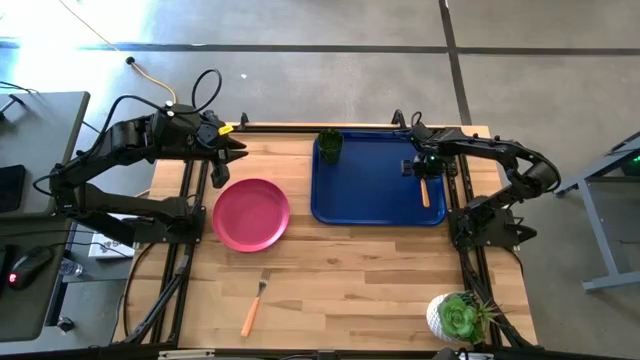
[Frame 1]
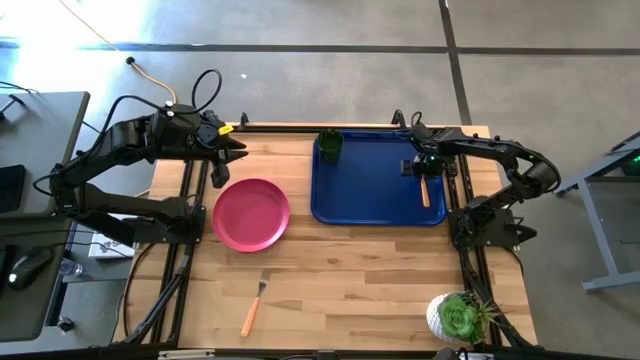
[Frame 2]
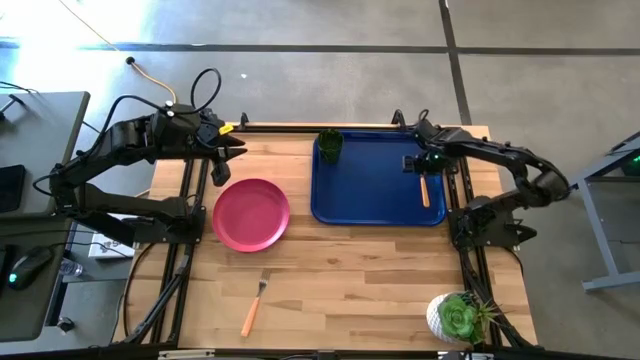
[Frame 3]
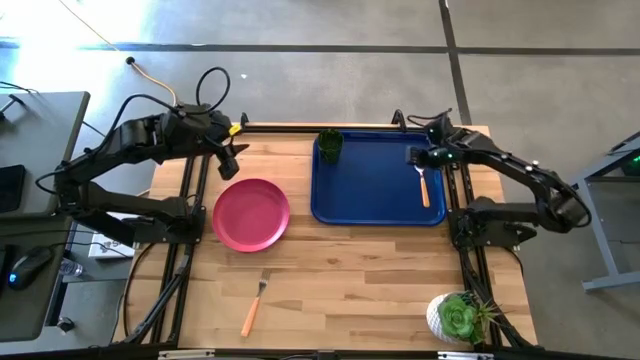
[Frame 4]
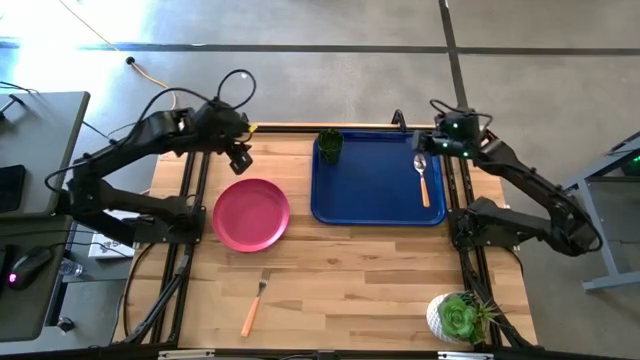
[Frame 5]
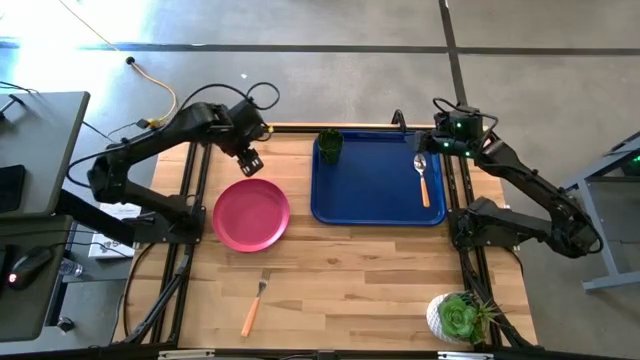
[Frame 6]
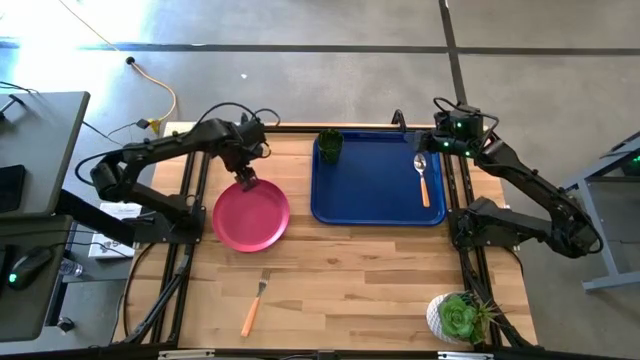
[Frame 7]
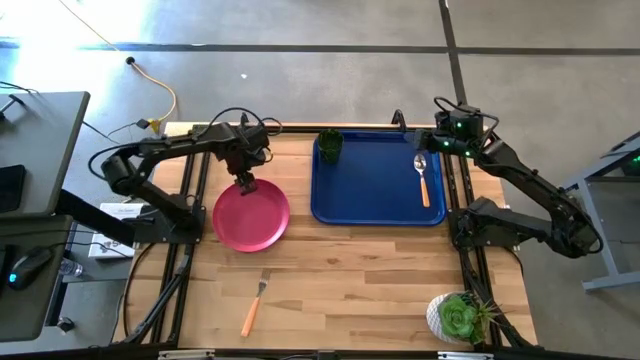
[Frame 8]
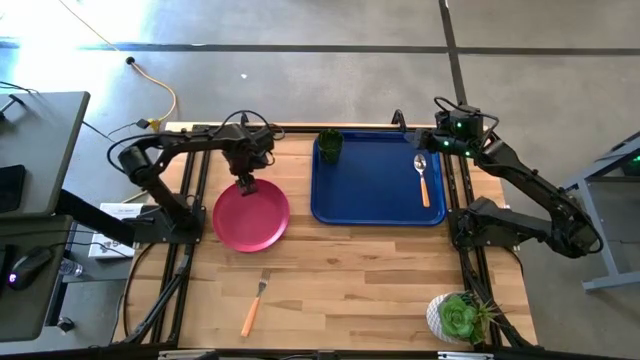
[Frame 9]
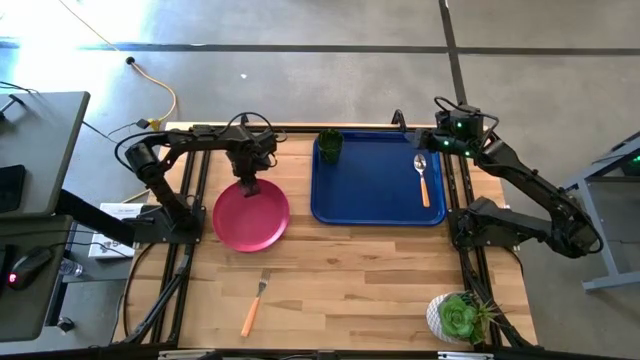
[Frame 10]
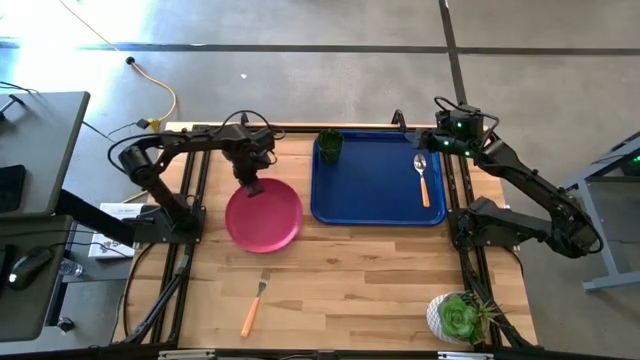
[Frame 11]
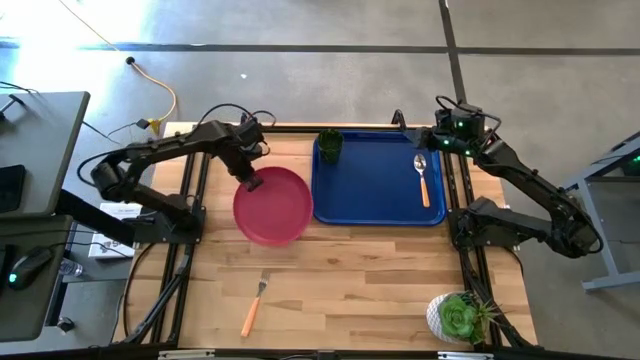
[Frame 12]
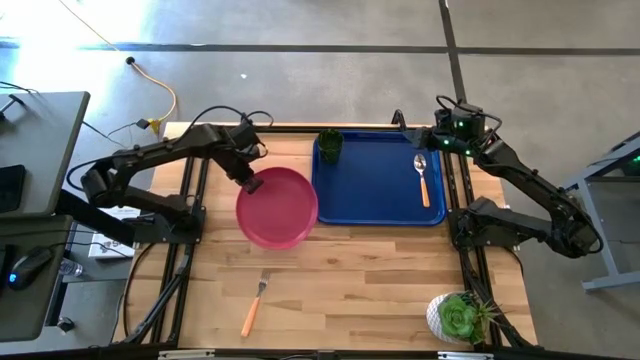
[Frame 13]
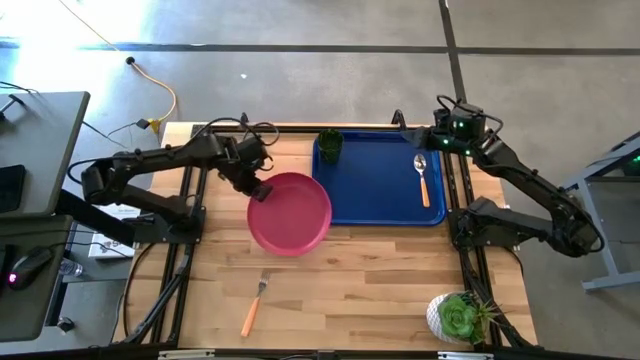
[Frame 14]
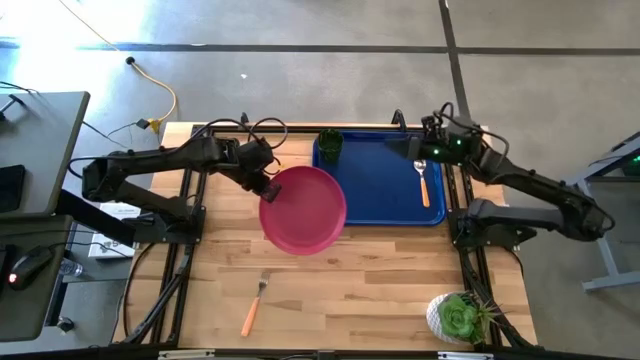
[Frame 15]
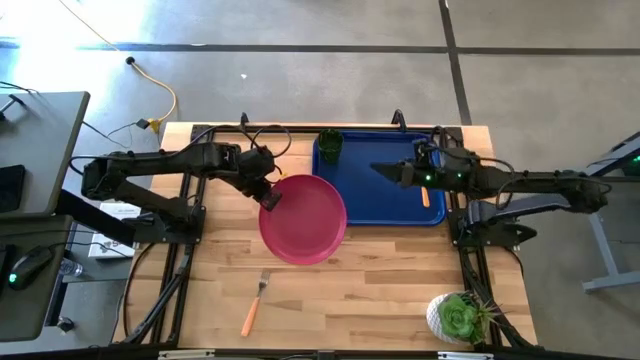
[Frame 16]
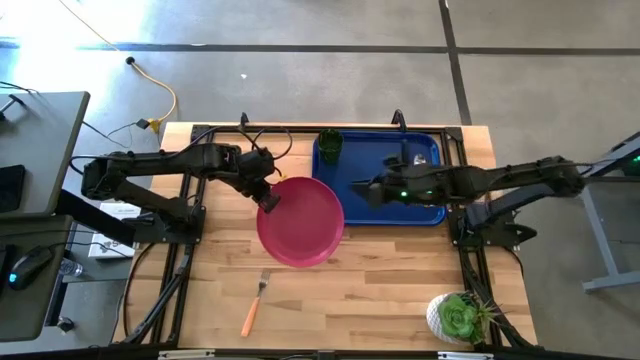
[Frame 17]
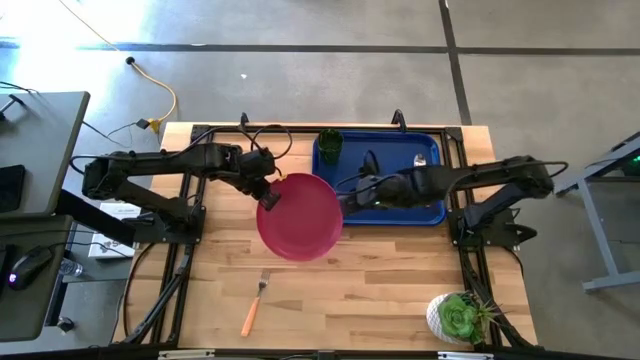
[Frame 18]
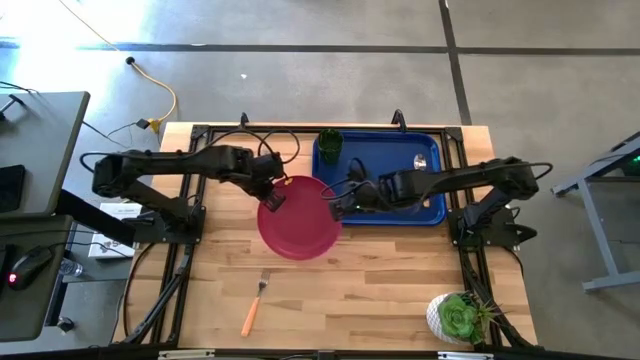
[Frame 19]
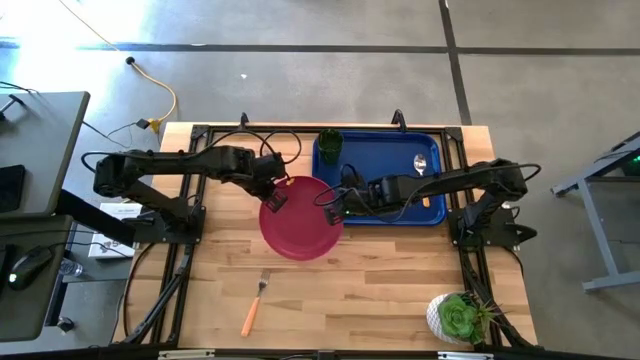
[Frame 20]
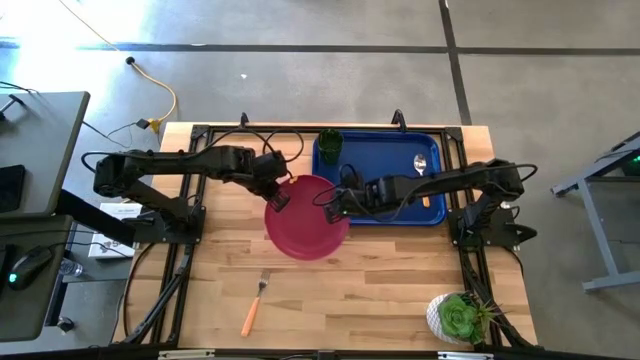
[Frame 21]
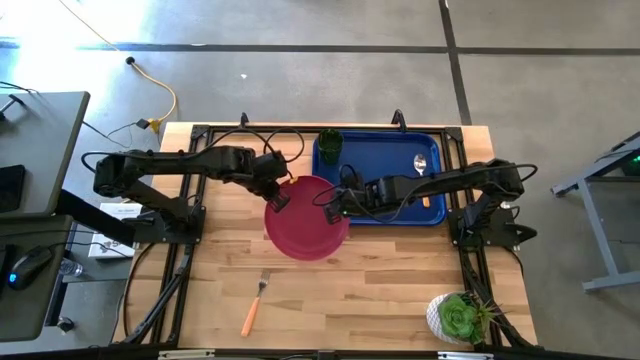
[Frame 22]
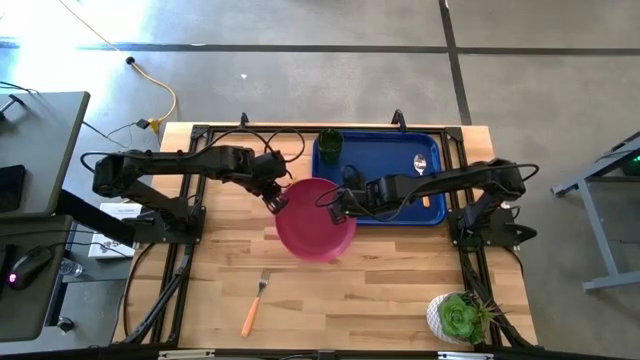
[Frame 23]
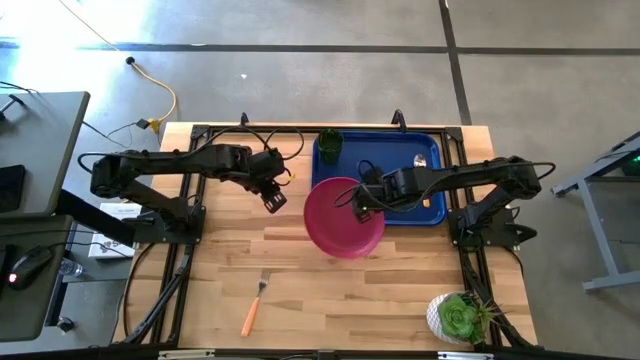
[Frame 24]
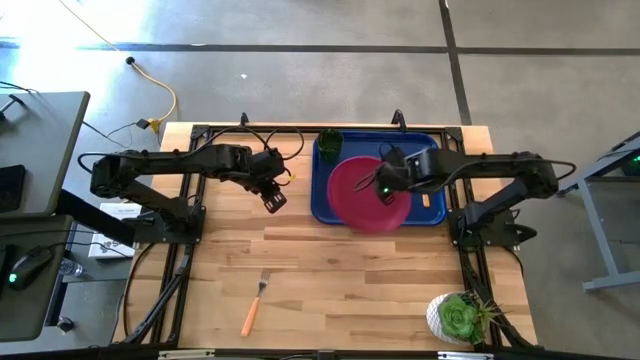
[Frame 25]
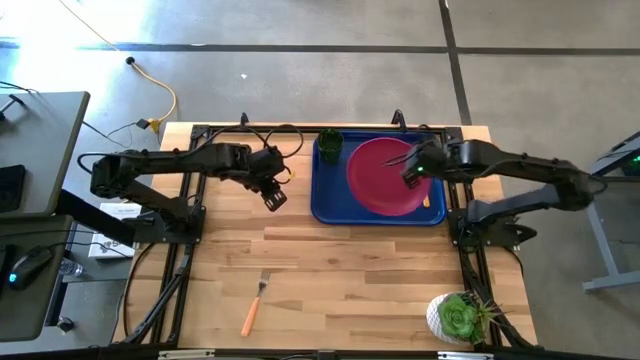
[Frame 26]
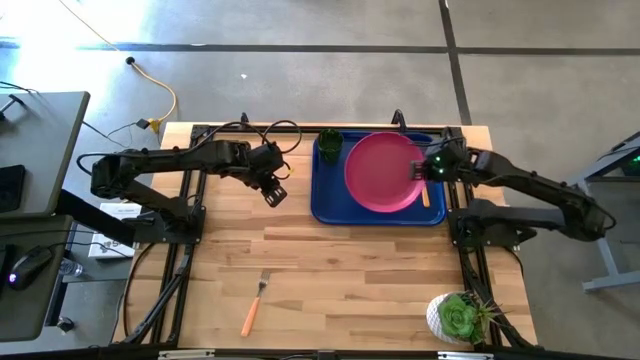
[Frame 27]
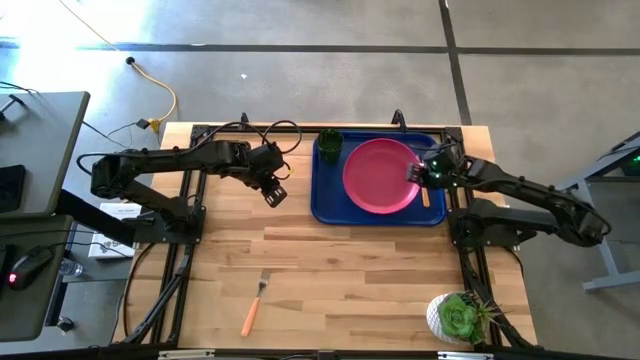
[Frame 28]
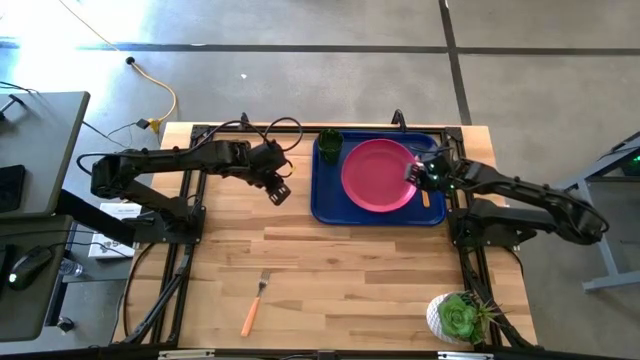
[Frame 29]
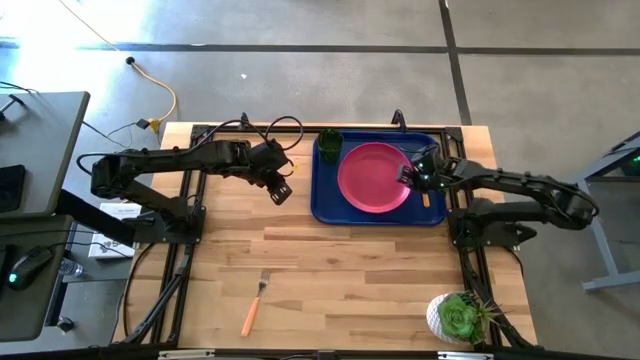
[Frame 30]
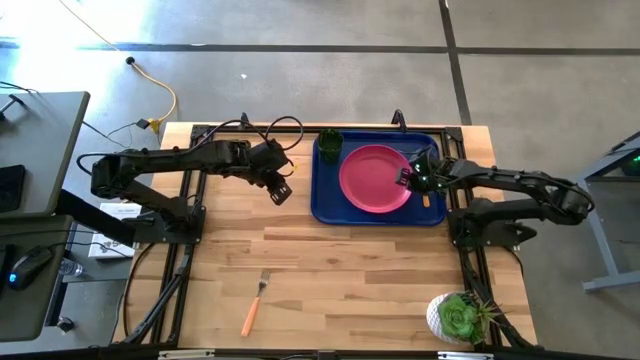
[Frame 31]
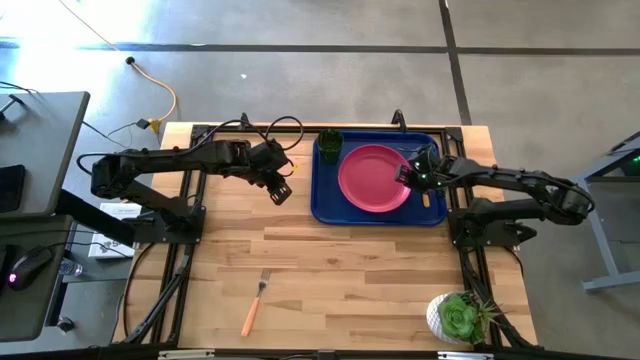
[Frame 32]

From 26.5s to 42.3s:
Task: Pick and place plate/cup/fork/spoon on tray
Put the pink plate on the blue tray

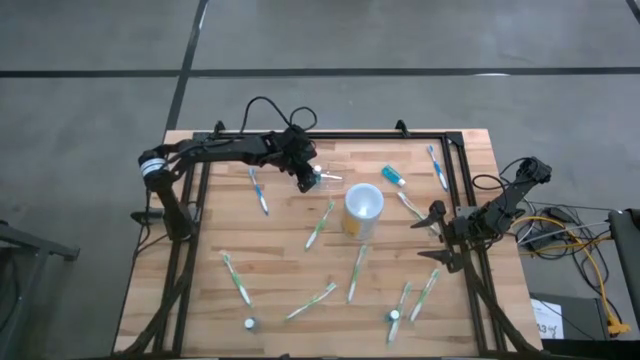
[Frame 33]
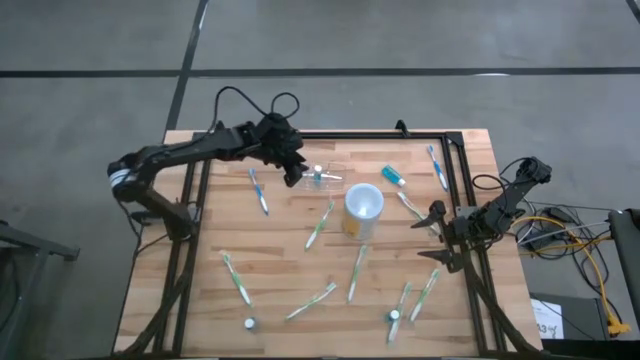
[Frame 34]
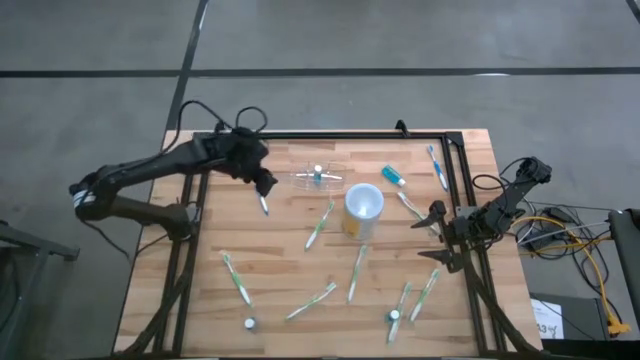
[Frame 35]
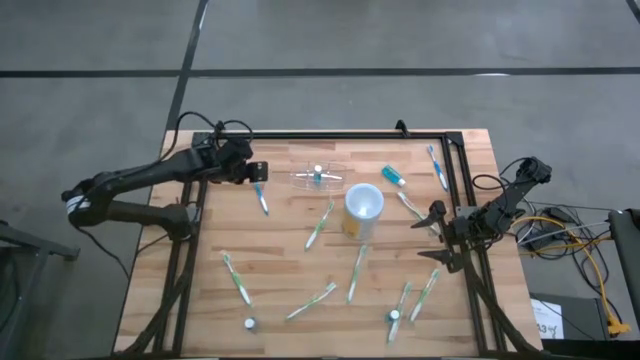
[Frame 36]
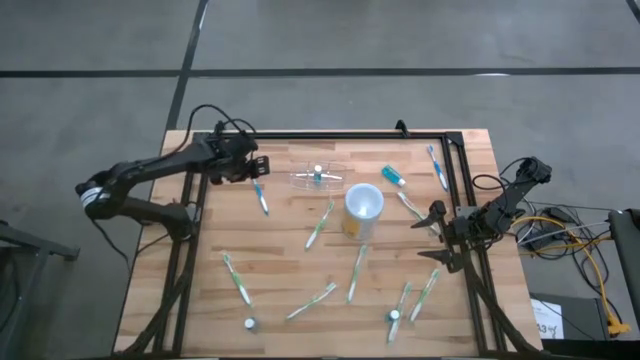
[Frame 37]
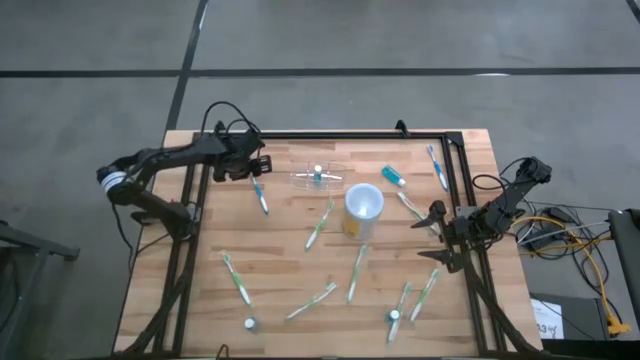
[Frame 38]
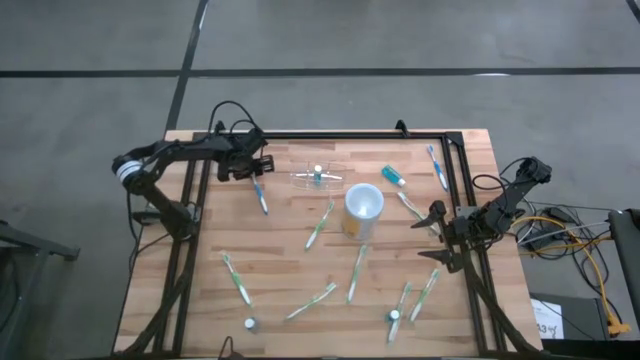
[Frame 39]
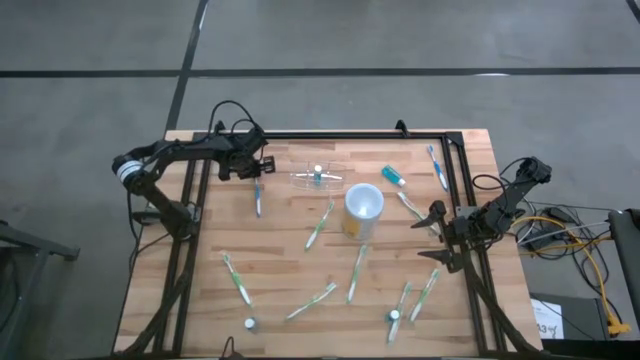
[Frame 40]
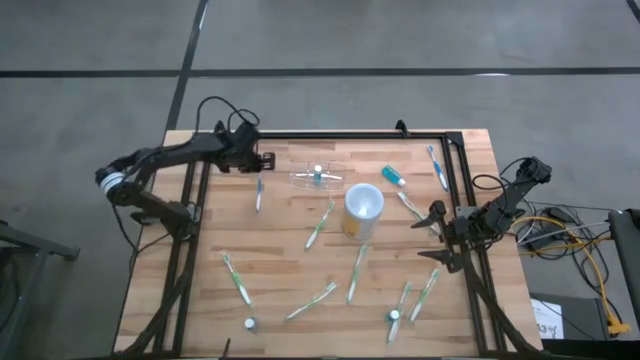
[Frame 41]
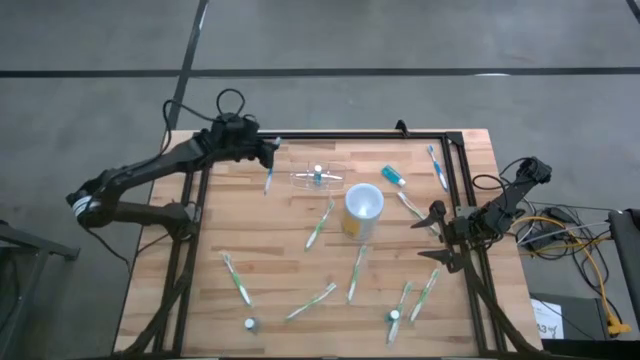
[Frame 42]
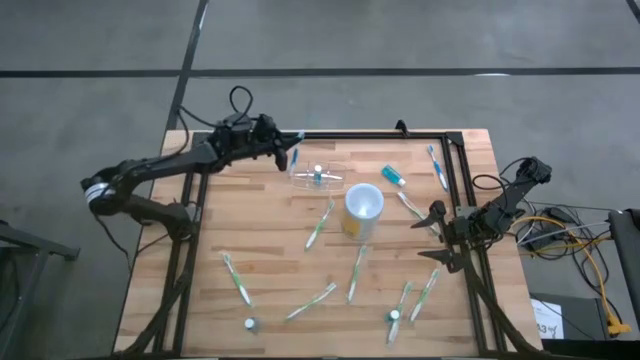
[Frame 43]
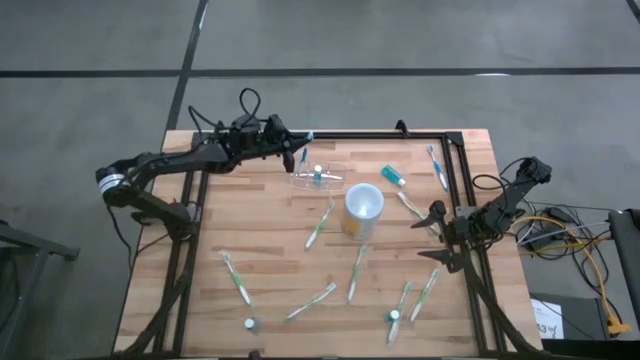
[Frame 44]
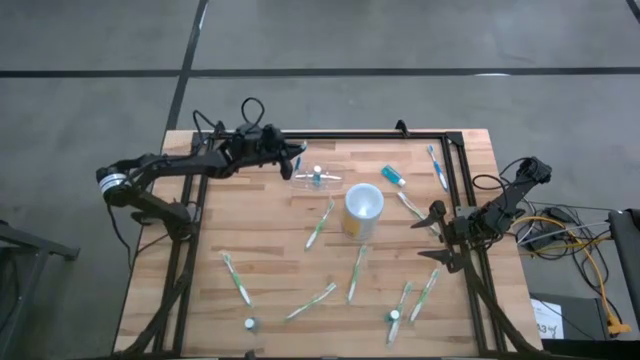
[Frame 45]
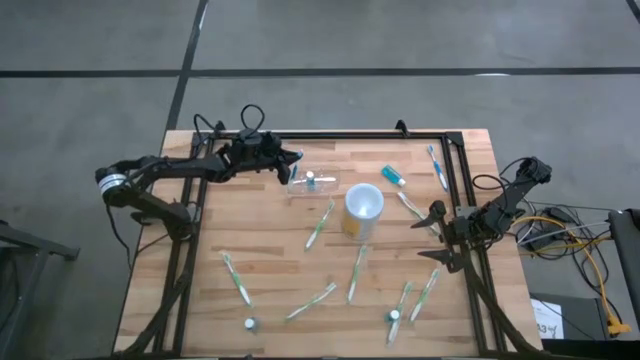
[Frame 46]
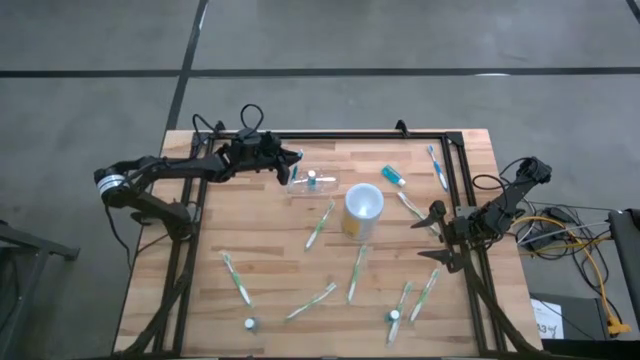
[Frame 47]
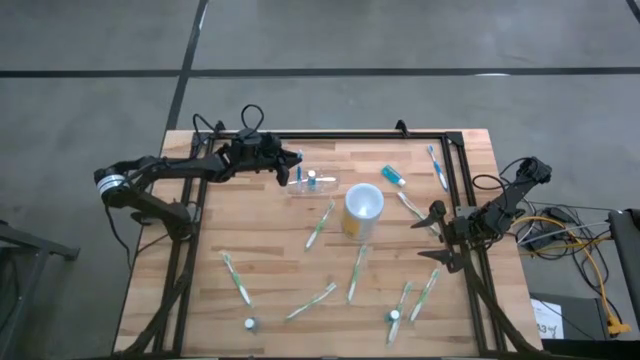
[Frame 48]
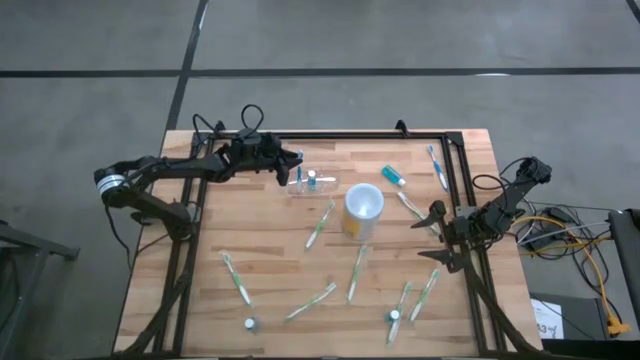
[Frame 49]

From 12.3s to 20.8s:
Task: Pick & Place toothbrushing station
Put the blue toothbrush into the left section of the transparent organizer
